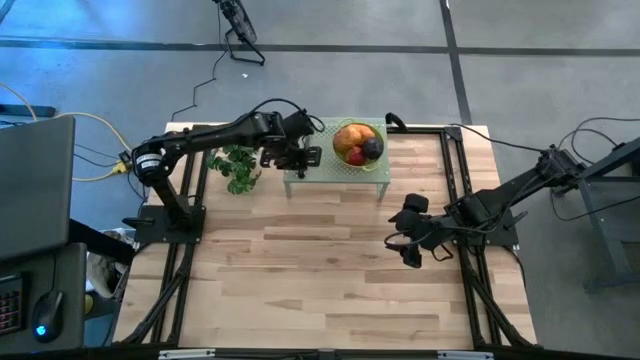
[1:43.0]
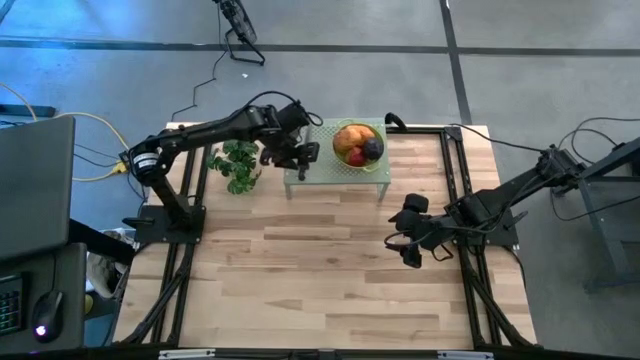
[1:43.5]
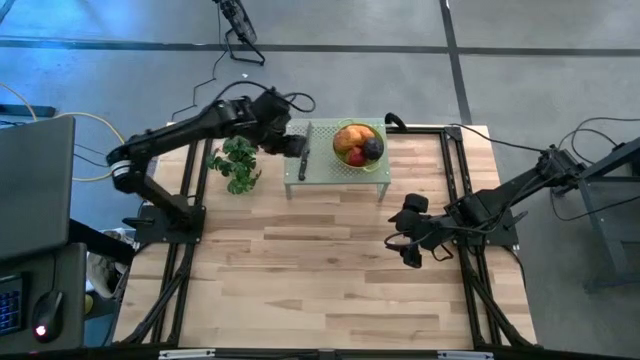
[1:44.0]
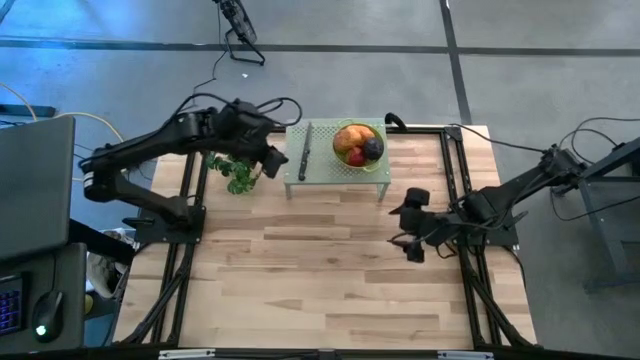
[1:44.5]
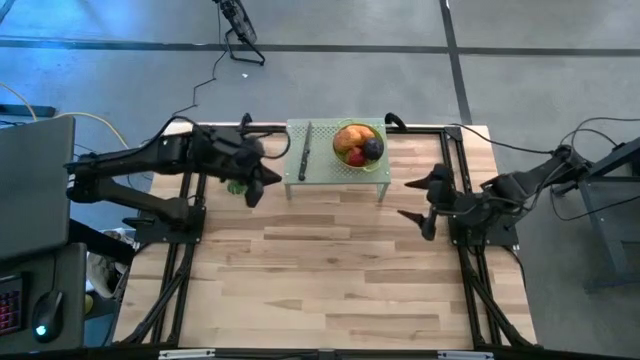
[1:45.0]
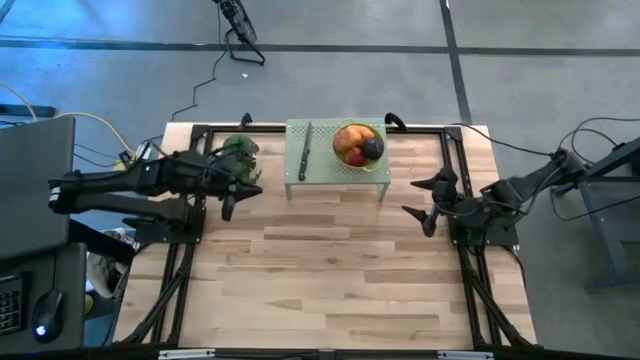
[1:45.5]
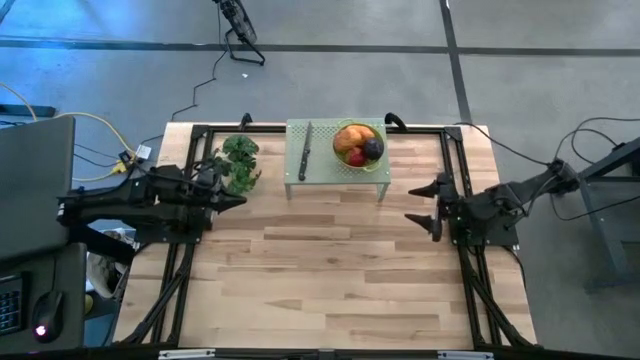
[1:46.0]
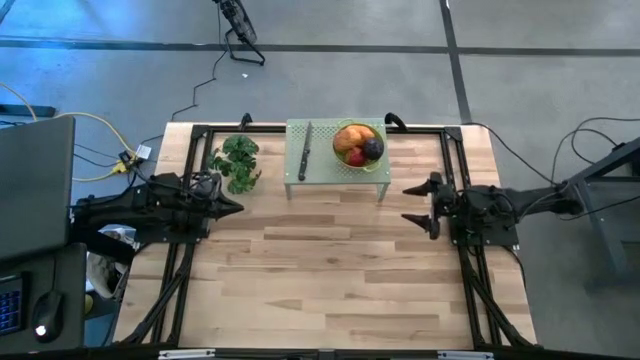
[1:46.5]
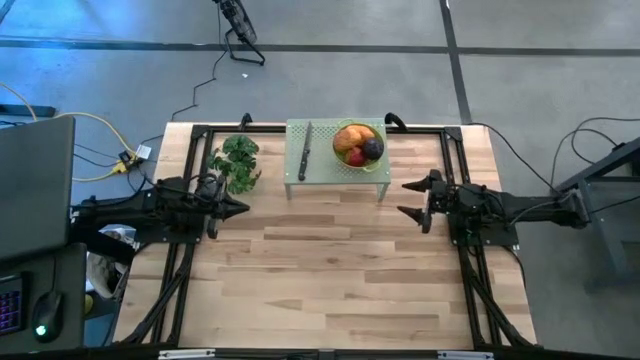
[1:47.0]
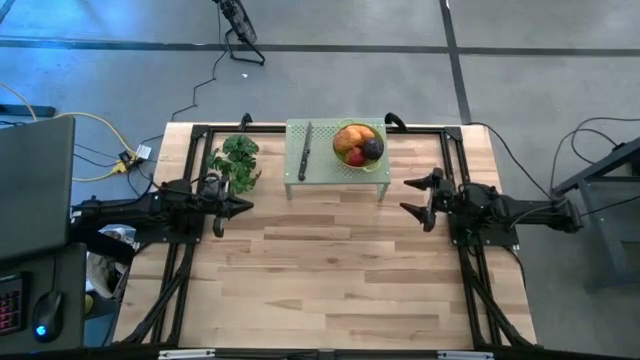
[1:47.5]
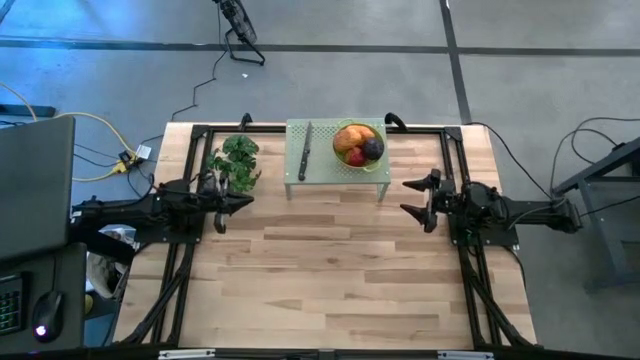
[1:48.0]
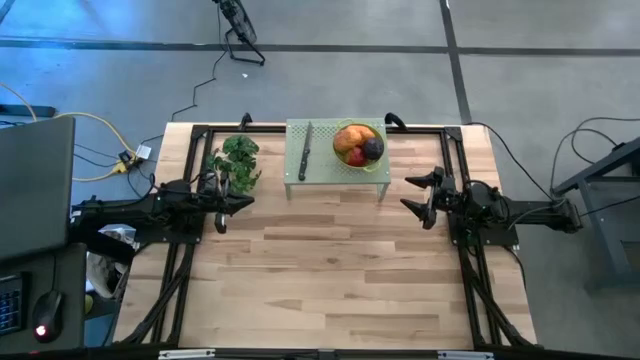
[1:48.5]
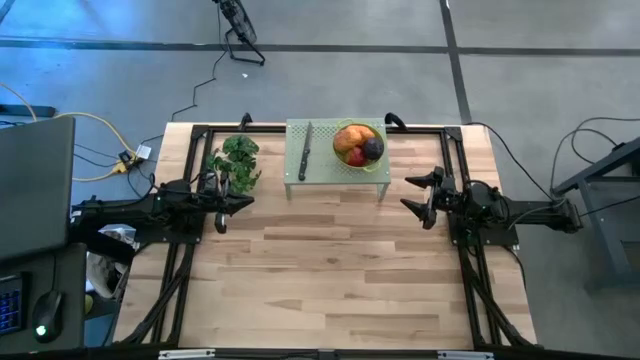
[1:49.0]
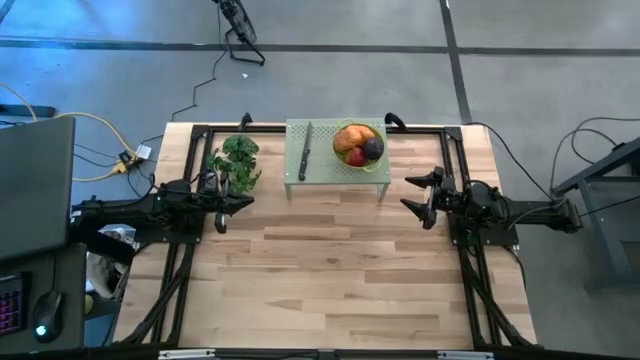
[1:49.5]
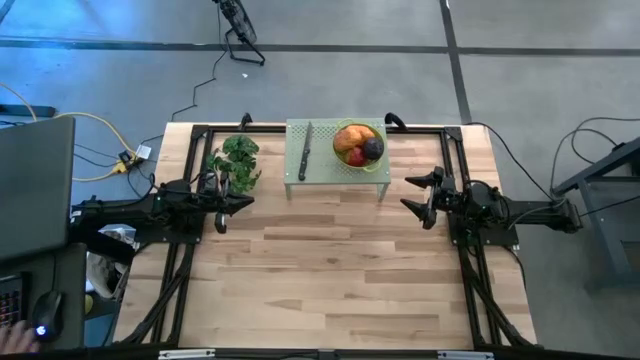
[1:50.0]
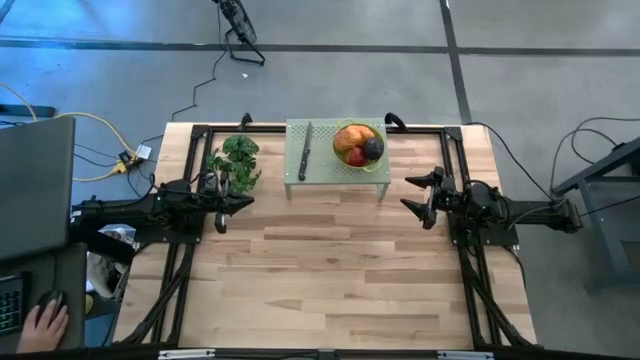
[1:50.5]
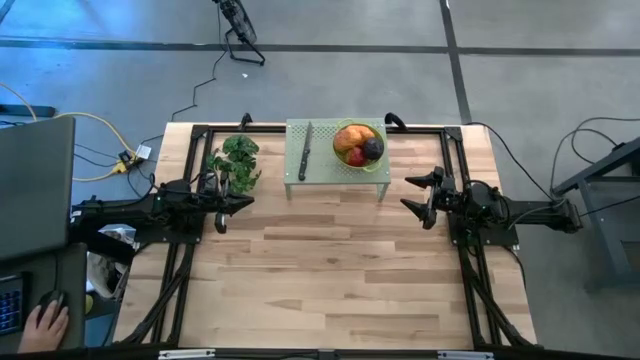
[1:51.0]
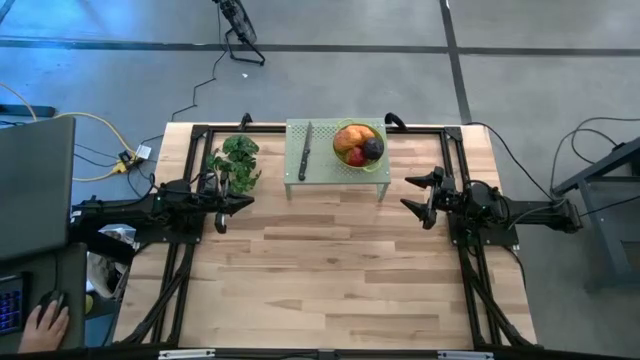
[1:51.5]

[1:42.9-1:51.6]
Task: Pick & Place Fruit
Return to Home Position

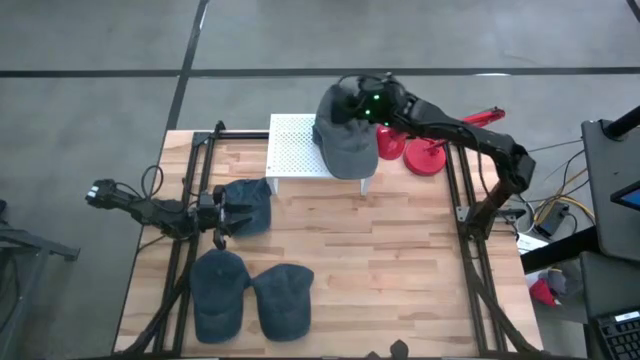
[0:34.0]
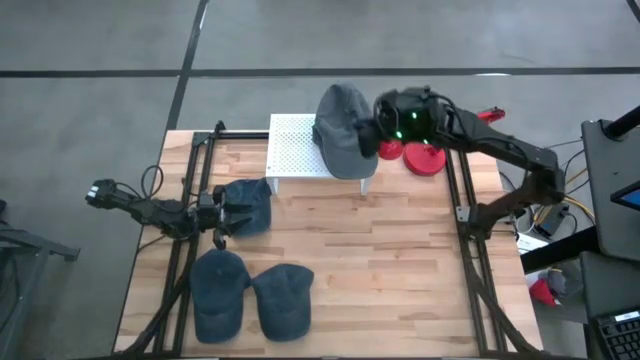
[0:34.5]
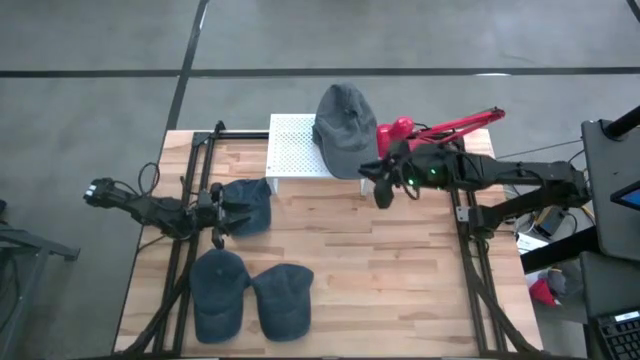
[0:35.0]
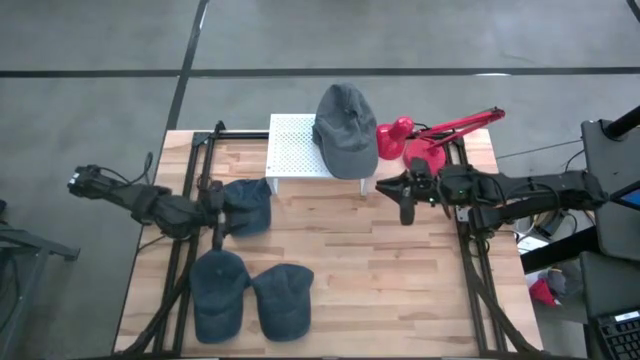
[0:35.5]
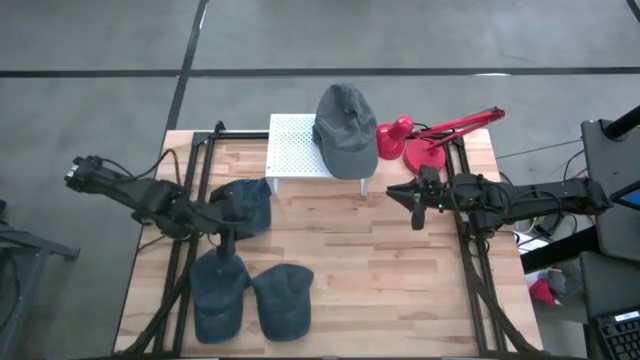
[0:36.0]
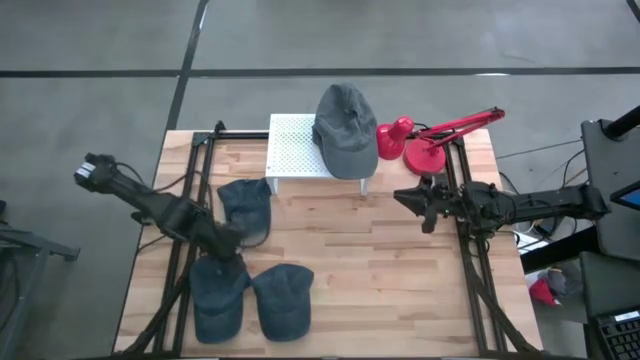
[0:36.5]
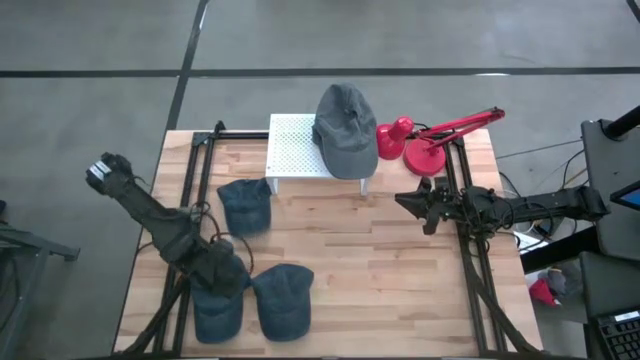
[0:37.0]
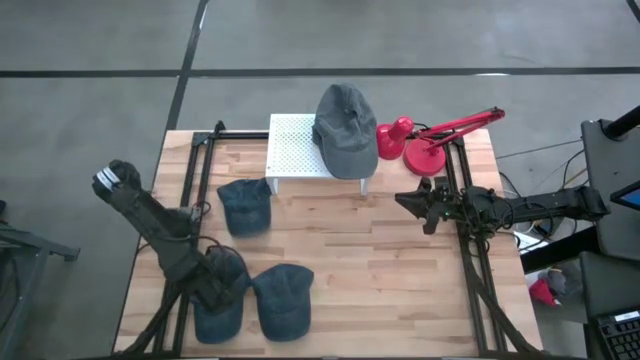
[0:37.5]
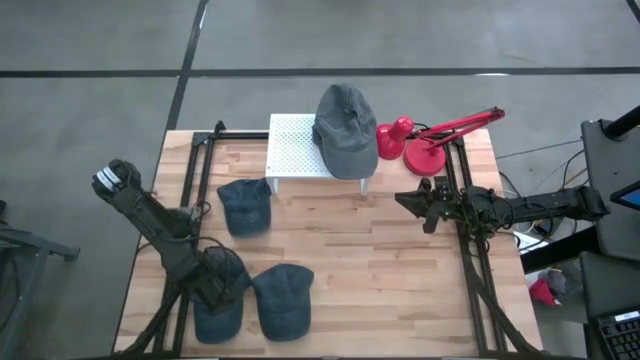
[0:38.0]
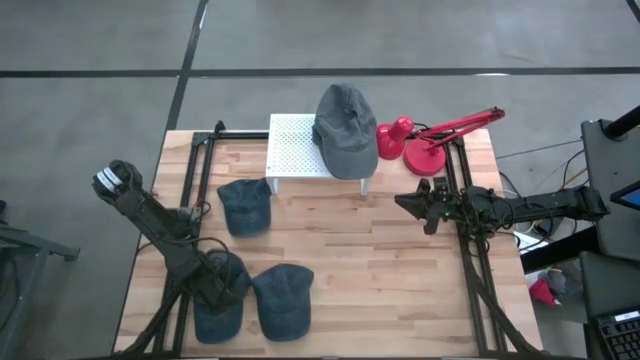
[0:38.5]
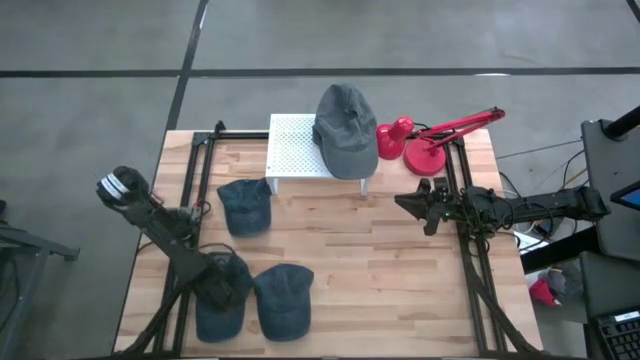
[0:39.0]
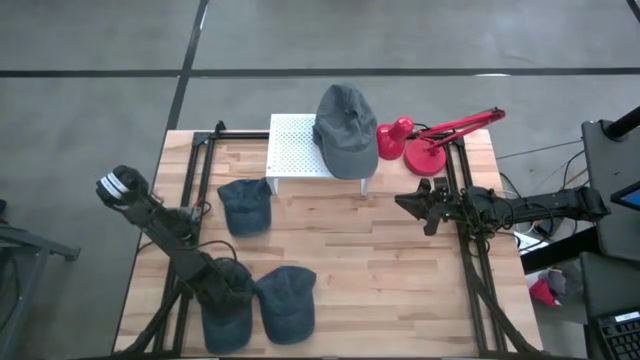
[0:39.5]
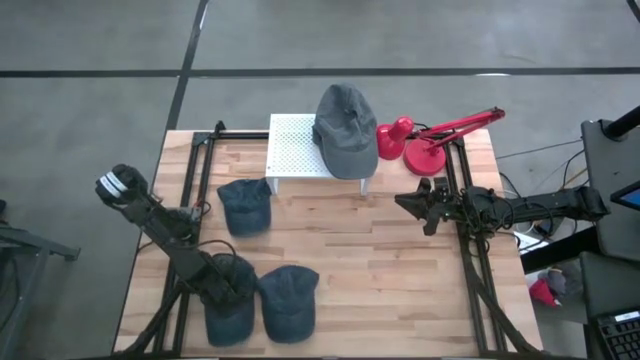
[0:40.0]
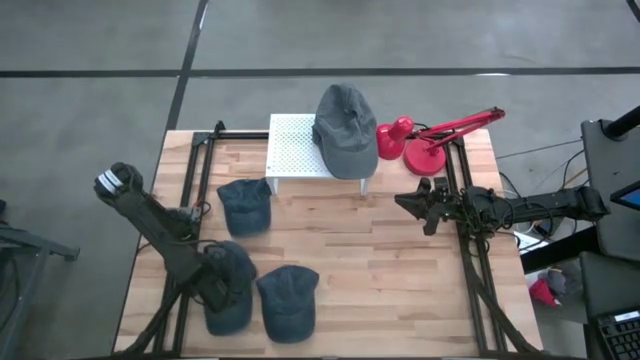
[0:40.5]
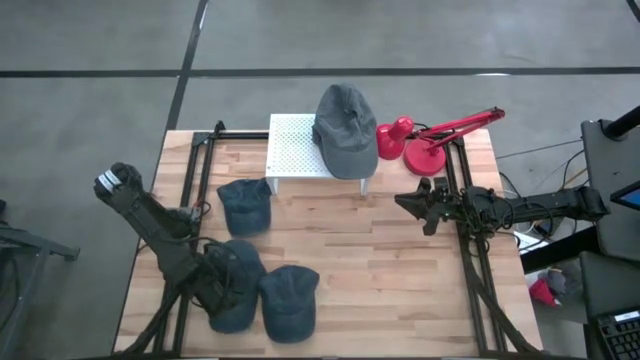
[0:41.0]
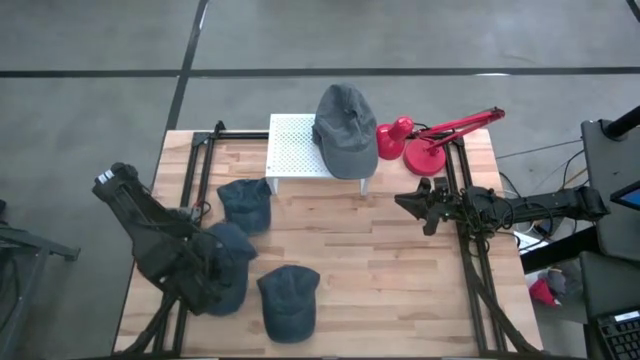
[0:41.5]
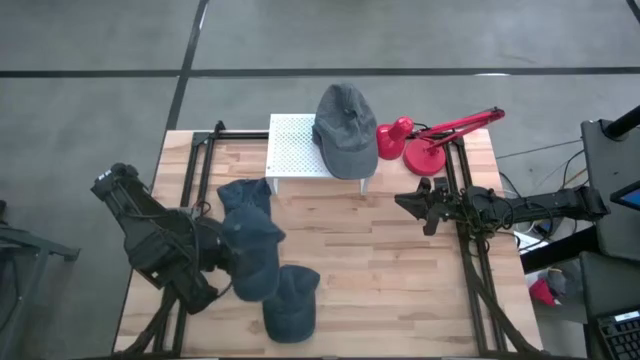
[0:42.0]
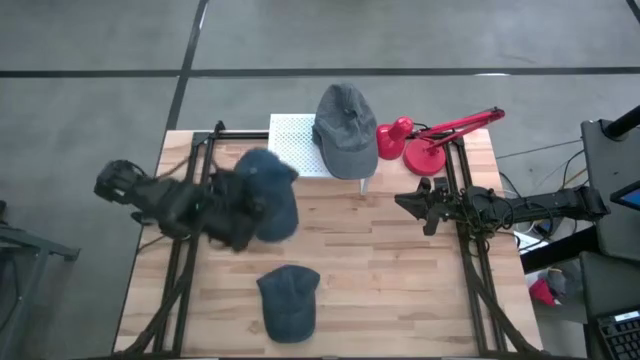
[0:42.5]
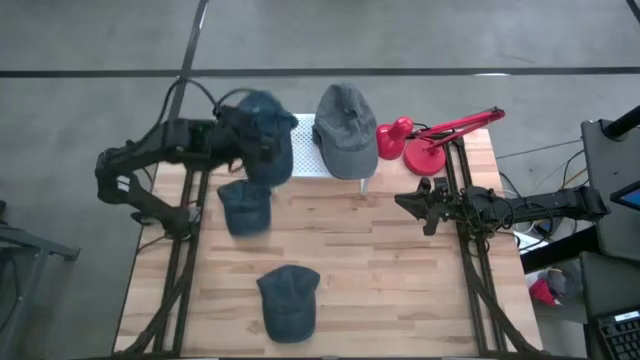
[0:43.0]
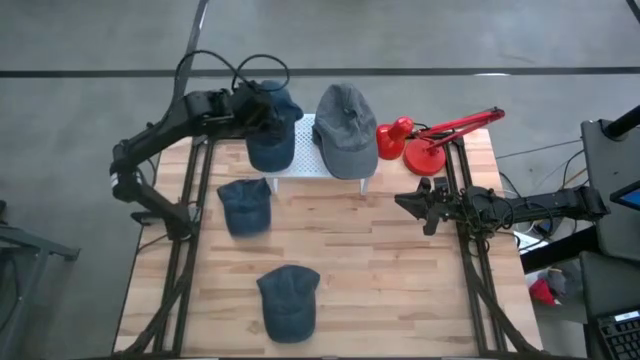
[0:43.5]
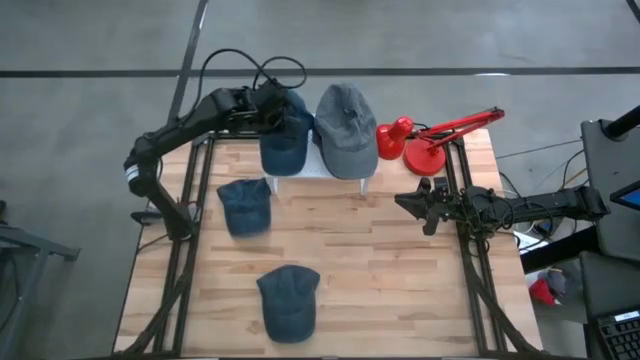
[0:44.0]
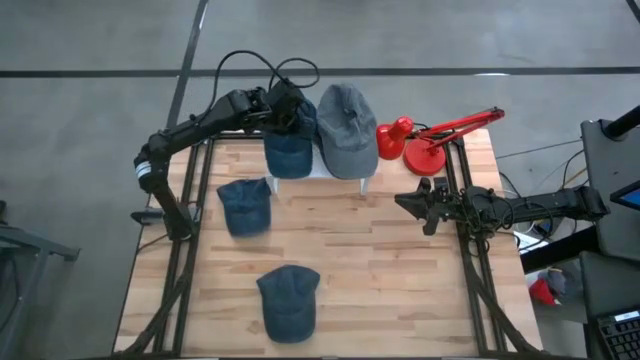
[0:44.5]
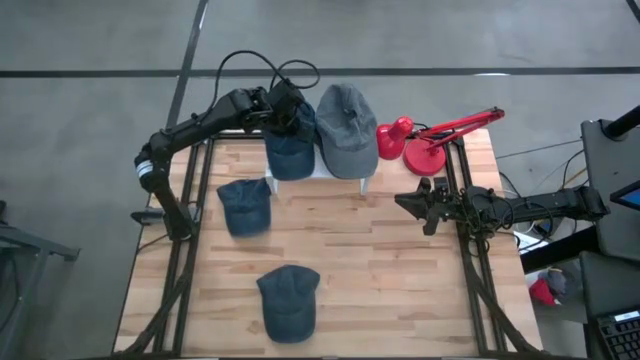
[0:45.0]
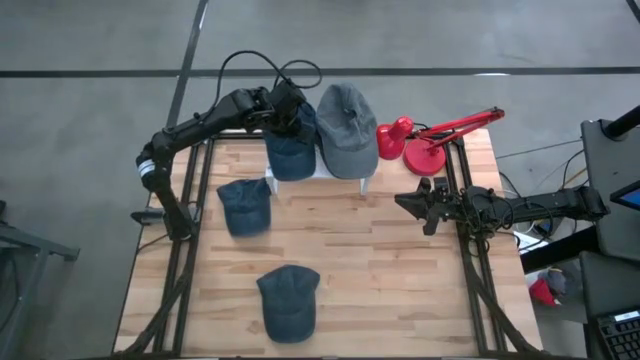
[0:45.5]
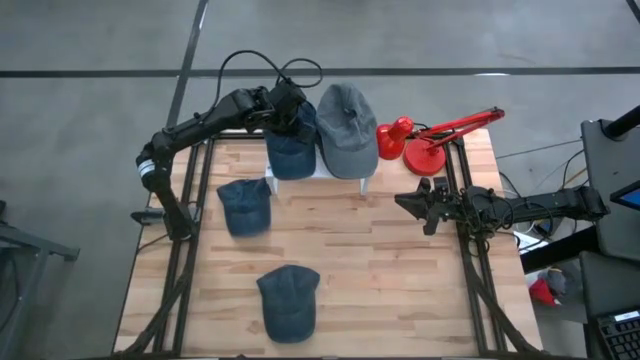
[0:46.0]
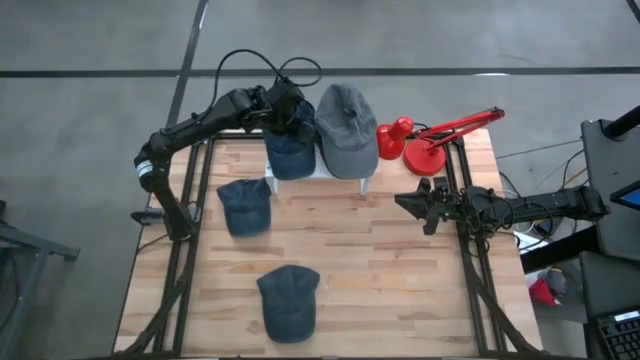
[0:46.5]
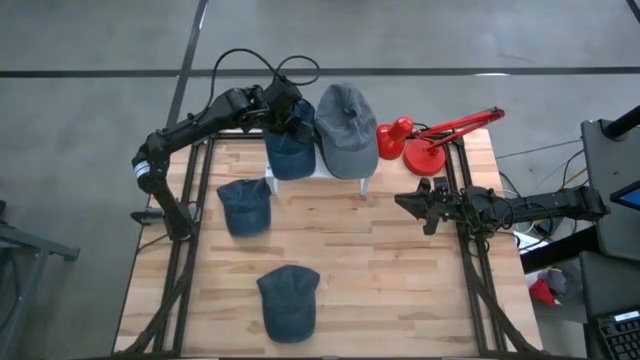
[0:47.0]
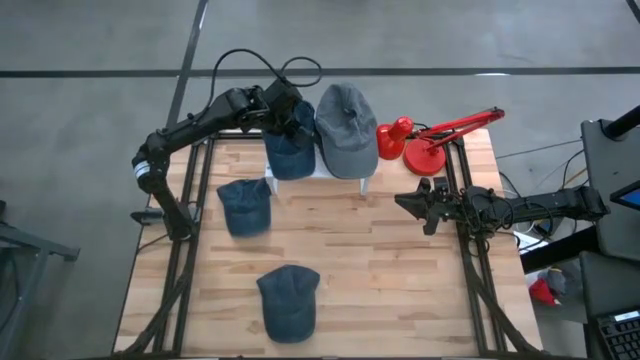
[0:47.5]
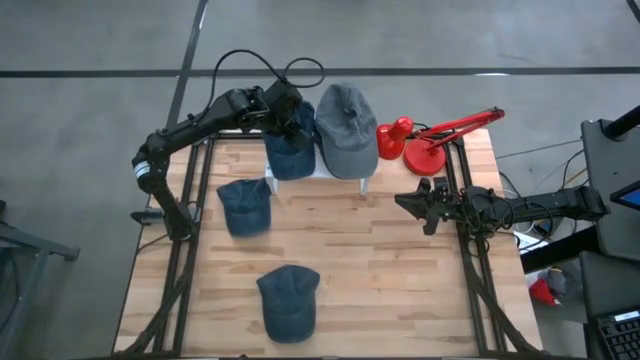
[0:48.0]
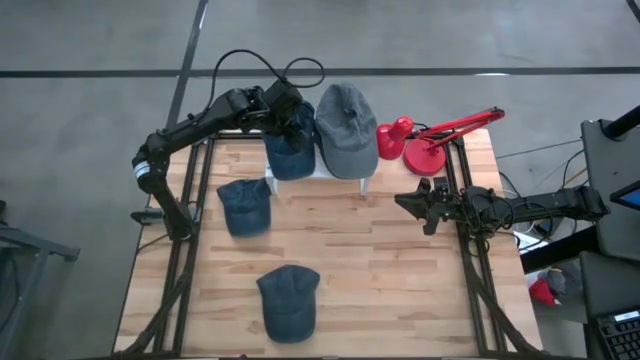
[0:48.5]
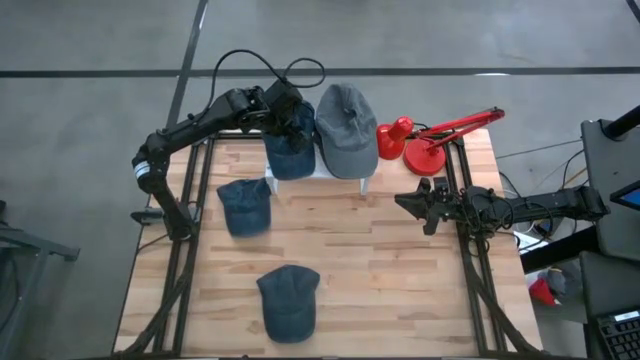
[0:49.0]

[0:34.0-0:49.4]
Task: Pick & Place hat
Put the bottom left blue cap beside the gray caps on the shelf
